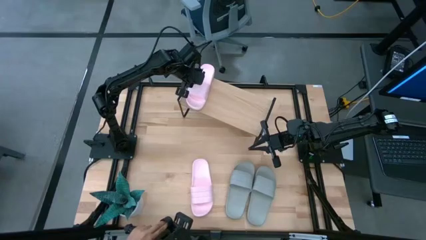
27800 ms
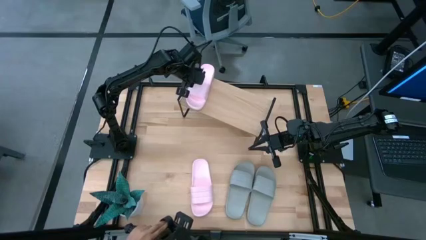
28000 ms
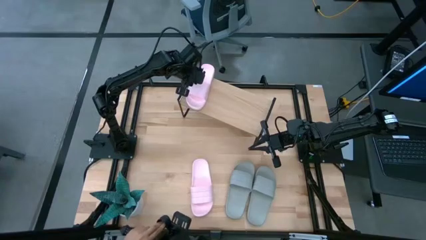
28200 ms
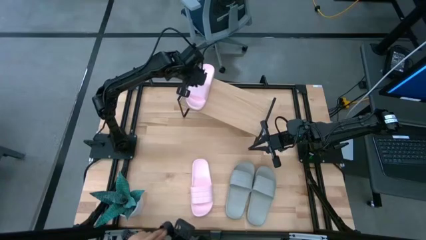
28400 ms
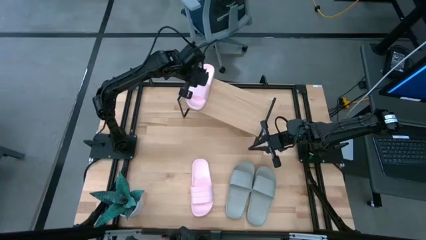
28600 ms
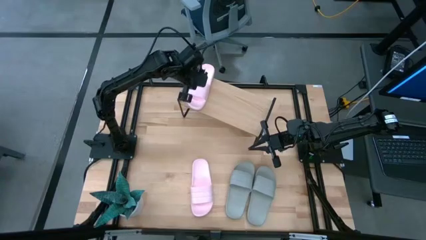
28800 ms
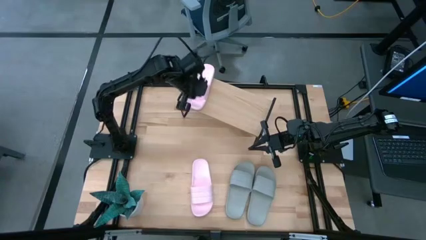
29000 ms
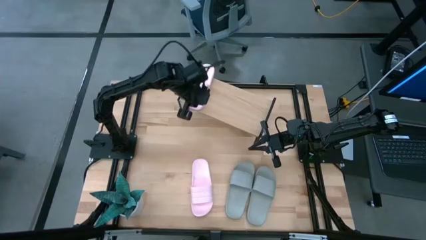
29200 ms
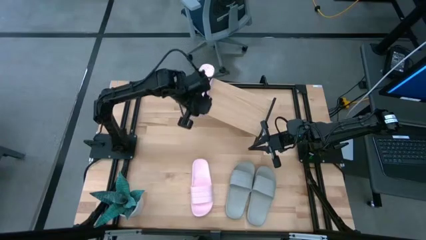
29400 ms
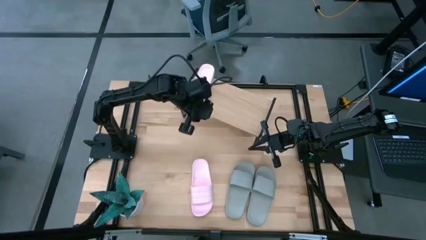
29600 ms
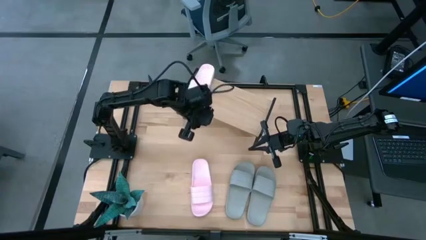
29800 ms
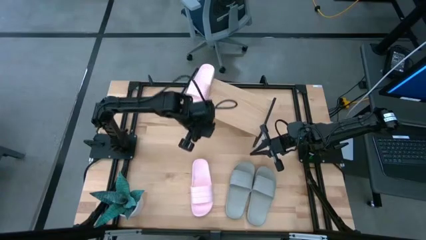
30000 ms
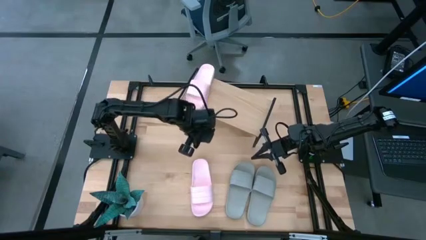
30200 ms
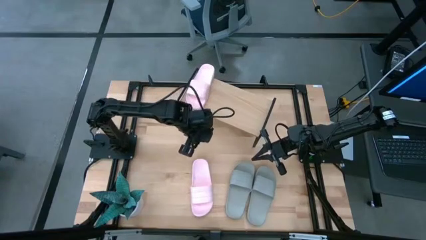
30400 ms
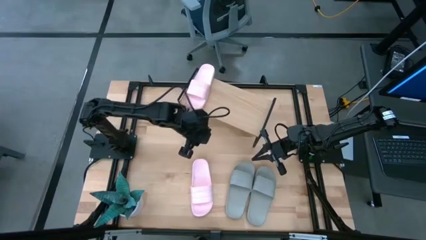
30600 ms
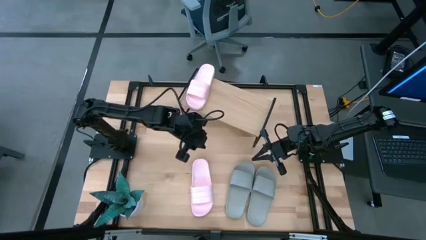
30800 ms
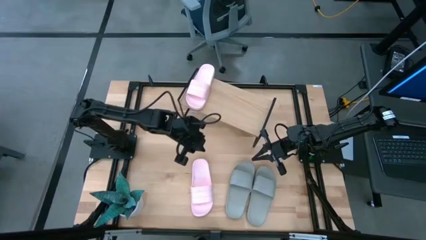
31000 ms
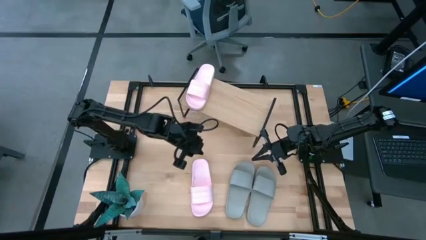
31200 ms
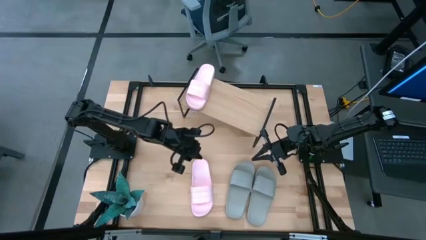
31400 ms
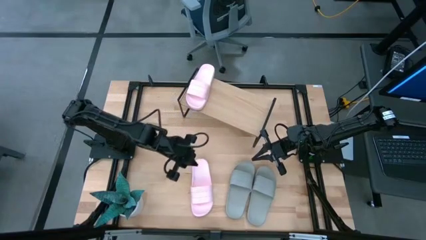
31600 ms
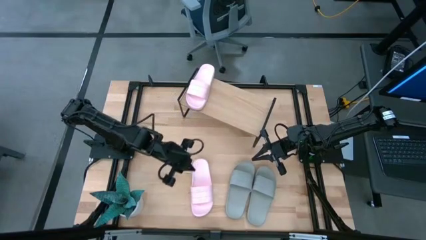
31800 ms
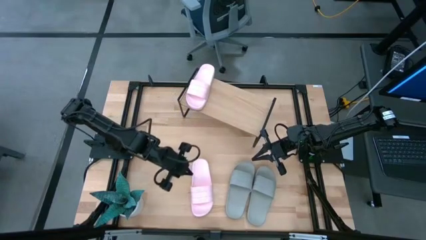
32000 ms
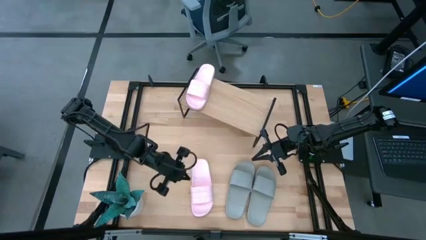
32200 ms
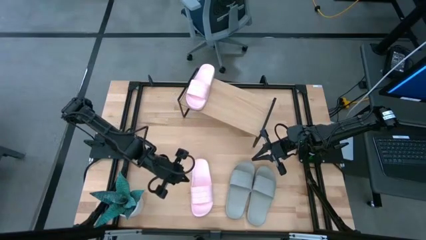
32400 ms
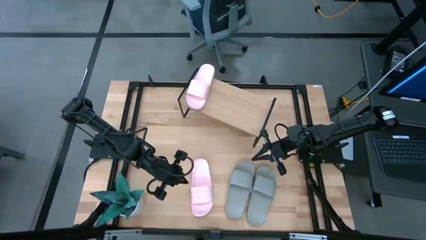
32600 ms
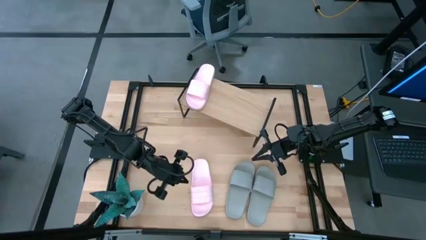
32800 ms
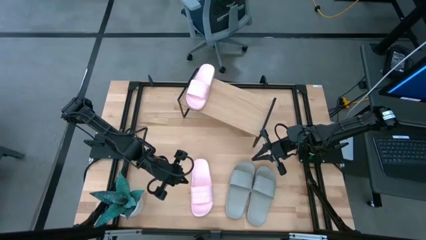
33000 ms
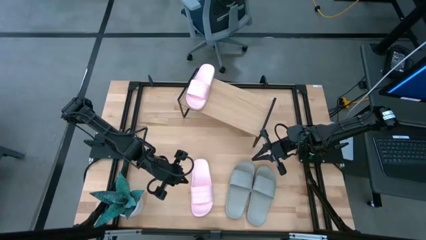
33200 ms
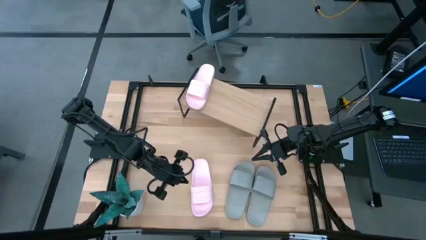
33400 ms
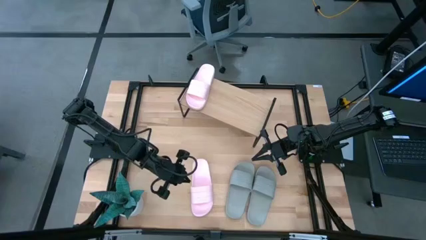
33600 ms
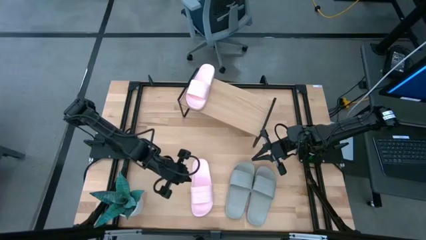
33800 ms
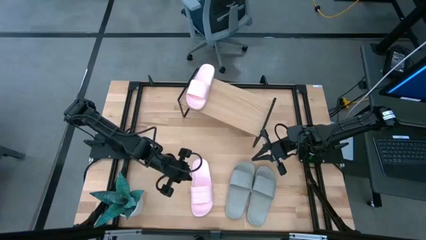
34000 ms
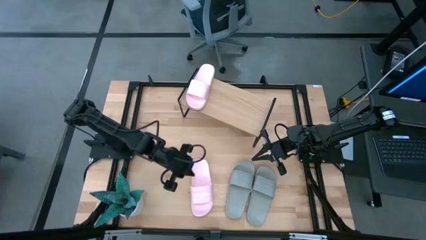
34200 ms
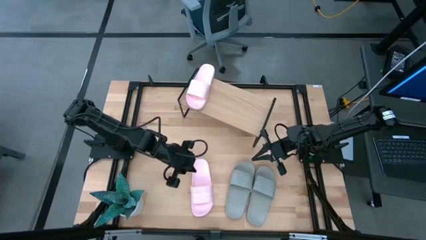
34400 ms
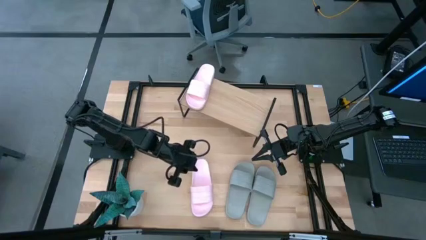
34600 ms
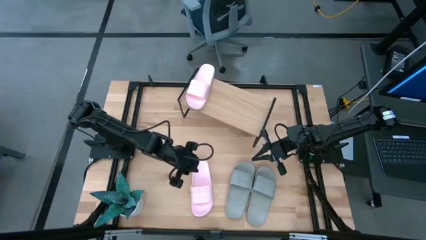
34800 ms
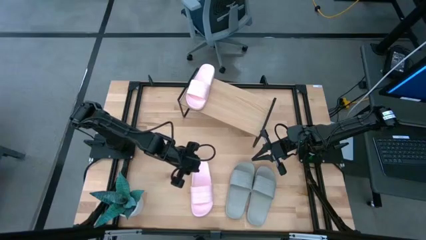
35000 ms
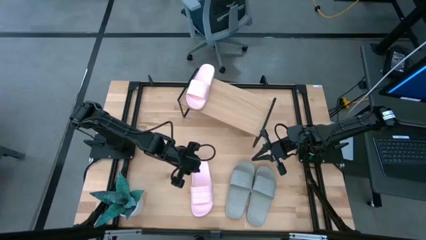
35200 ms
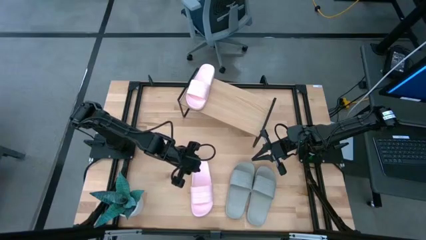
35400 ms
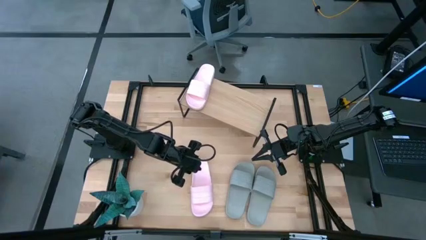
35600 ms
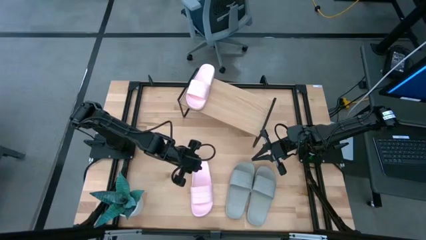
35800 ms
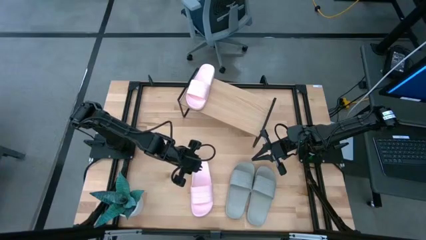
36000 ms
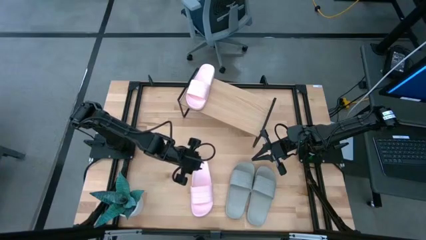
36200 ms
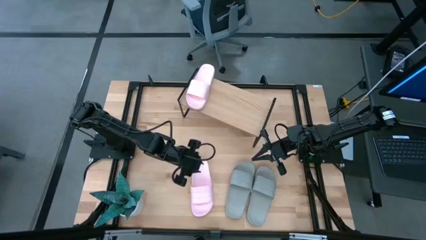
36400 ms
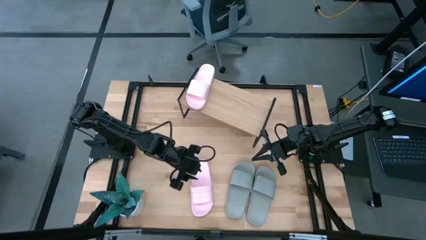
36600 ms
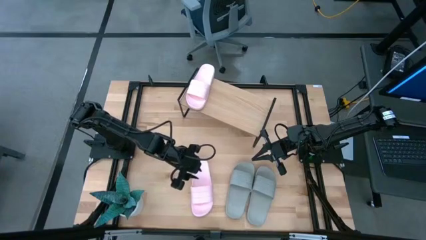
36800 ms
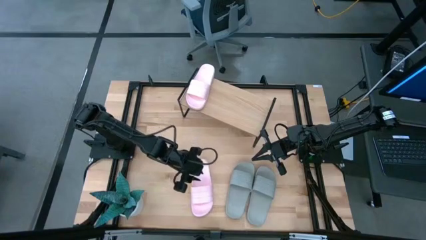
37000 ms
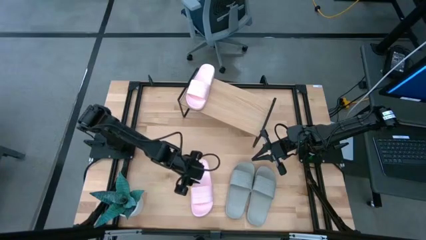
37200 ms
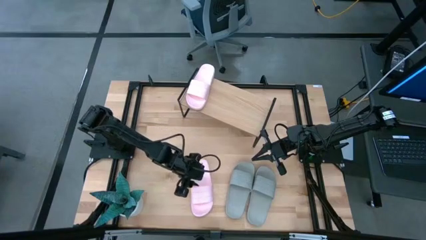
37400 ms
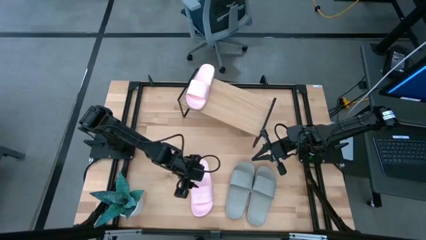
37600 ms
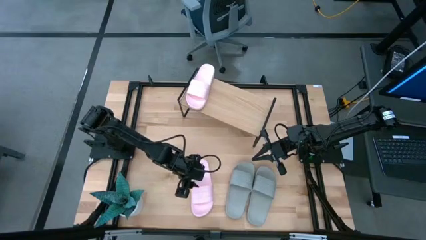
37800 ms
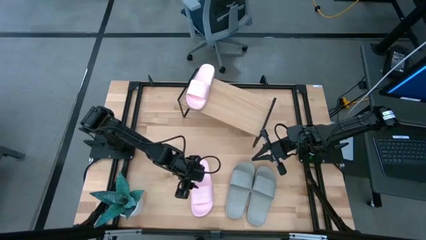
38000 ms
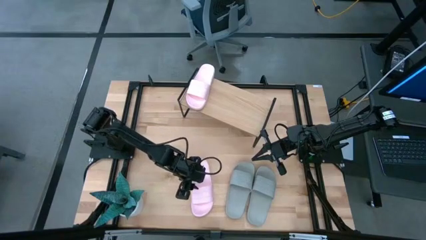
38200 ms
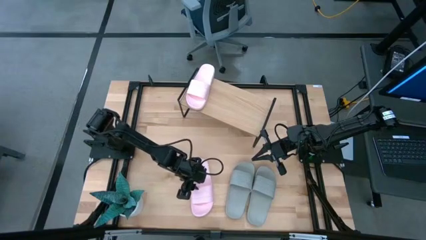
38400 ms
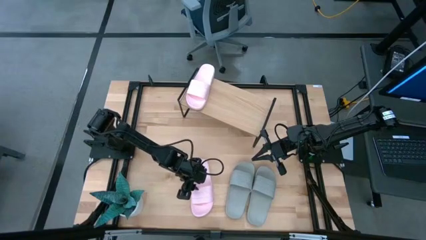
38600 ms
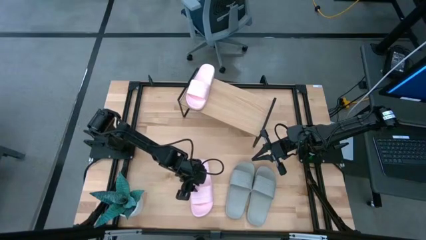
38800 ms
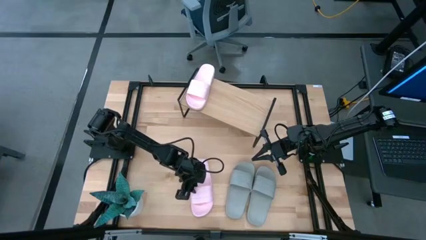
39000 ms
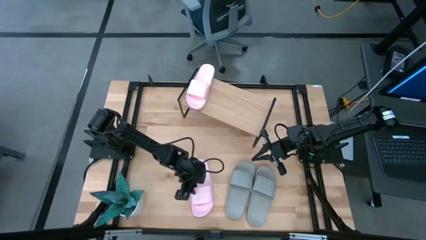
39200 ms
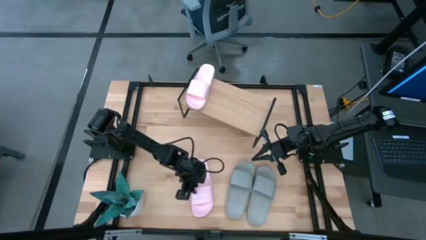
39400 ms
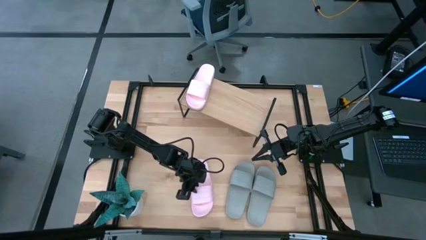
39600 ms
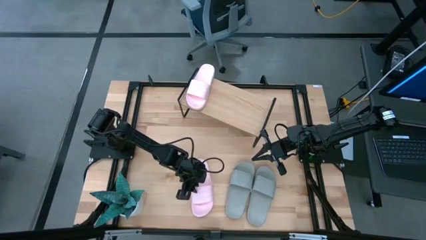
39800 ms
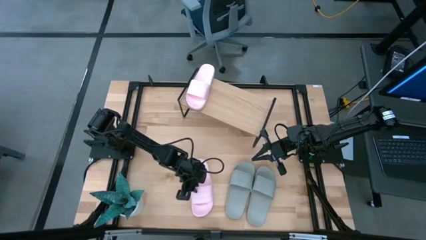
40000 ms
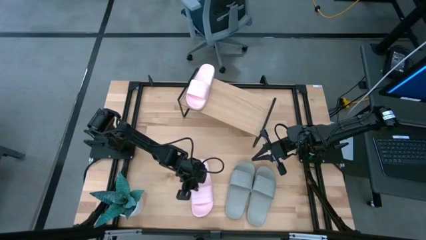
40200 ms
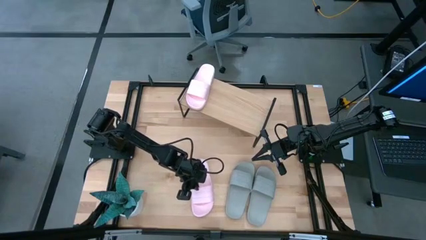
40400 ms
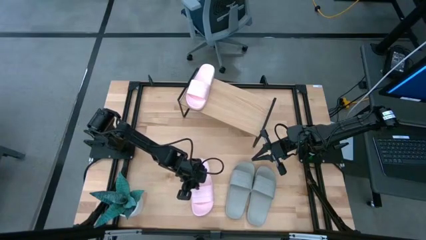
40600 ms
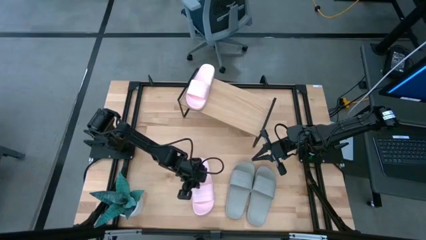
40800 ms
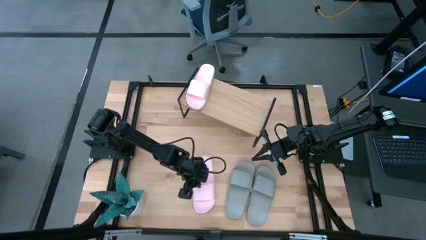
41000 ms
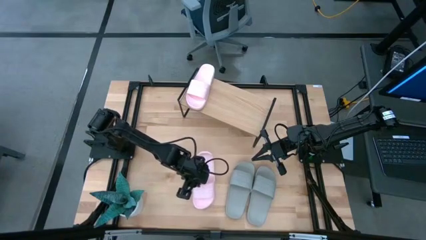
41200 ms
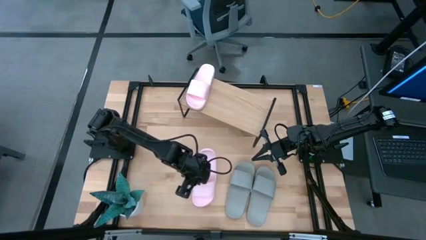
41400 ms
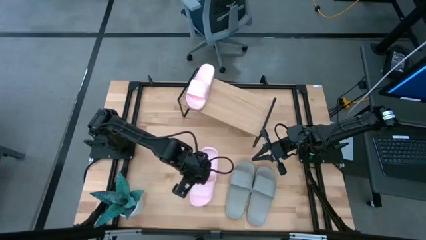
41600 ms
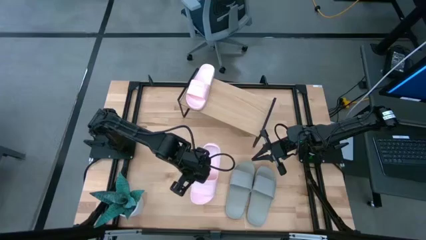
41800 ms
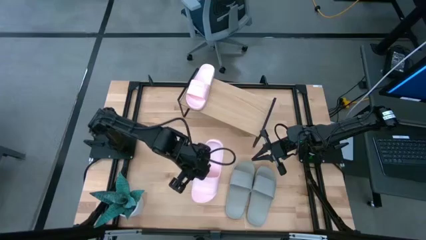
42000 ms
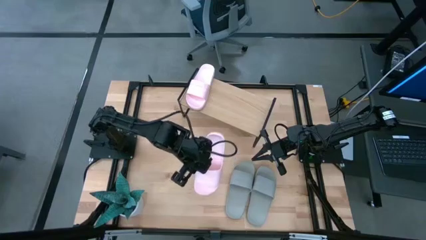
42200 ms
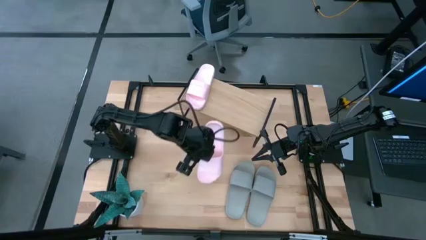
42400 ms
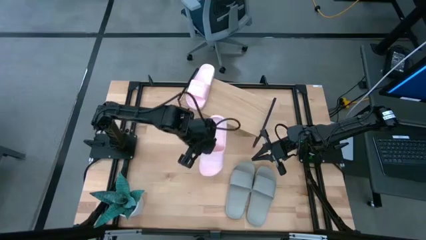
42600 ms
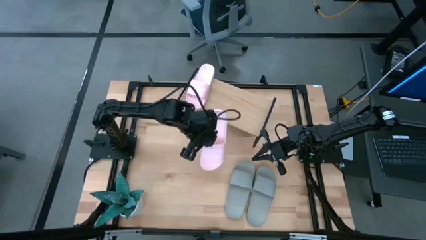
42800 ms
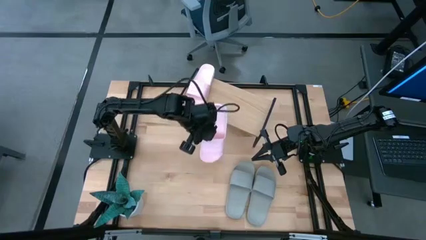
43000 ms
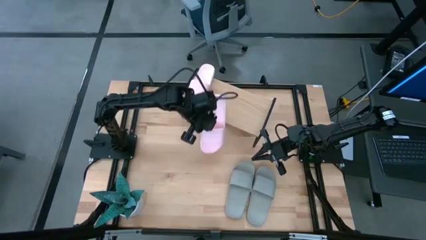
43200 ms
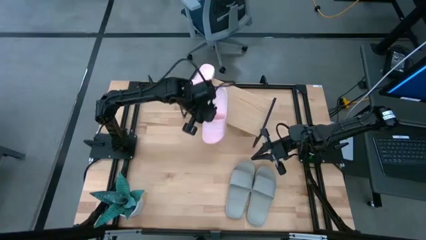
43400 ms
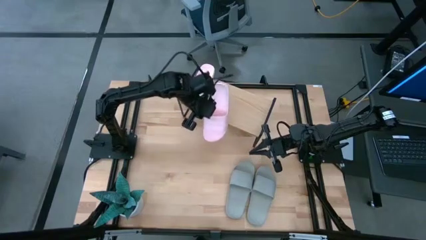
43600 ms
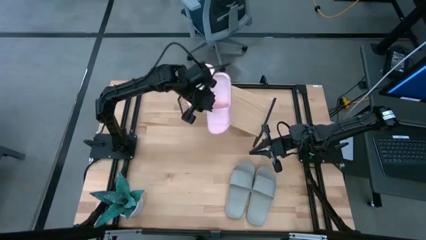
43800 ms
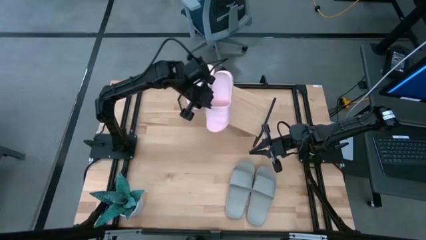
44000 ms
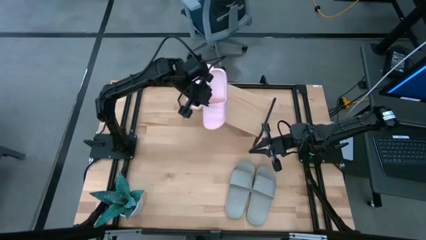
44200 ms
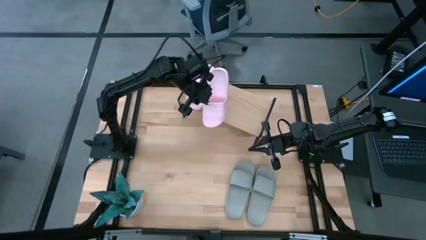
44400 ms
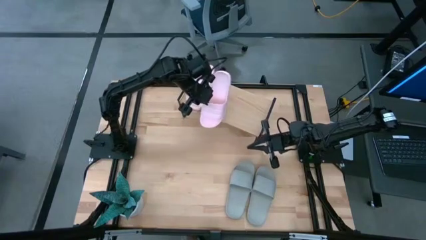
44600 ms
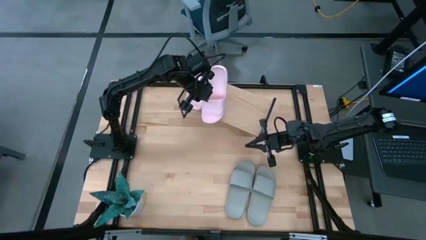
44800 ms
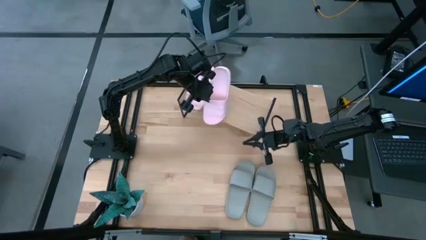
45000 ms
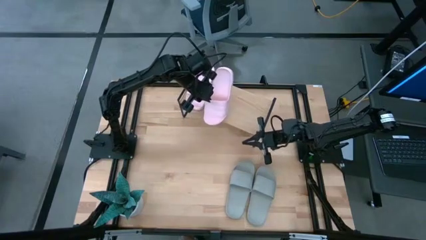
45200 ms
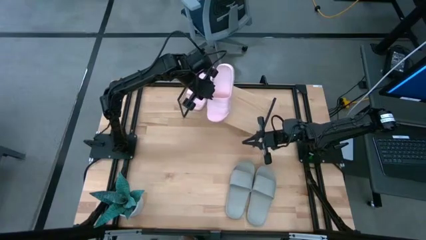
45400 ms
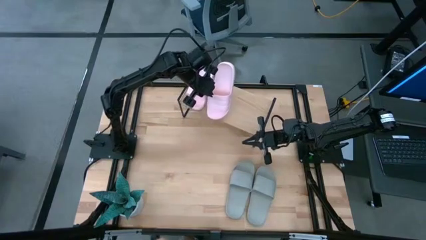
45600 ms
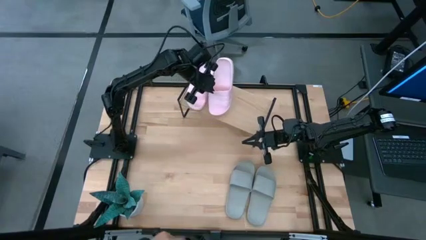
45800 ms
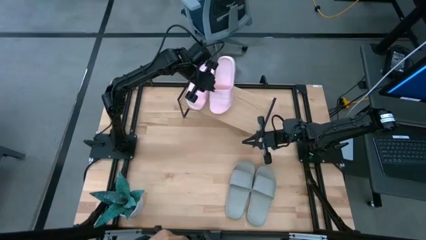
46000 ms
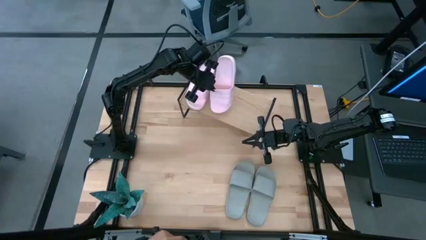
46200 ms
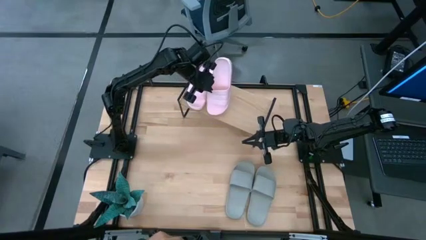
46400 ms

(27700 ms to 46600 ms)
Task: Pick and place slides into the shelf
Put the pink slide on the shelf
